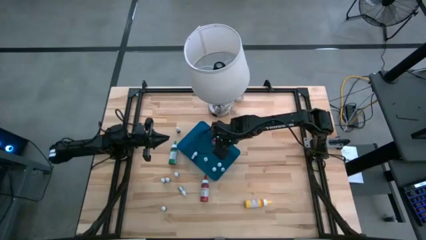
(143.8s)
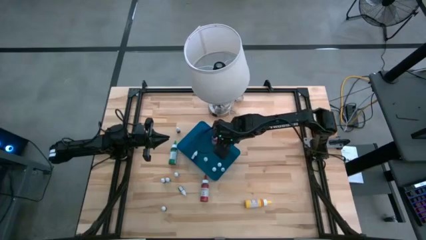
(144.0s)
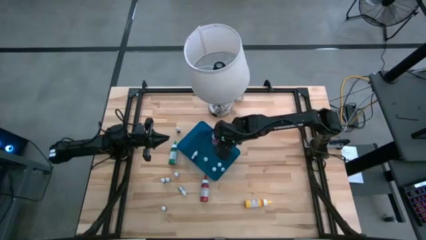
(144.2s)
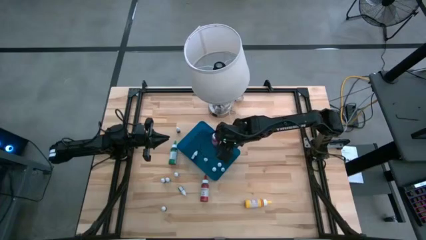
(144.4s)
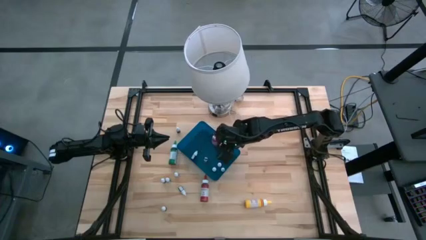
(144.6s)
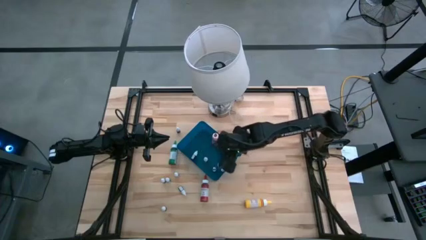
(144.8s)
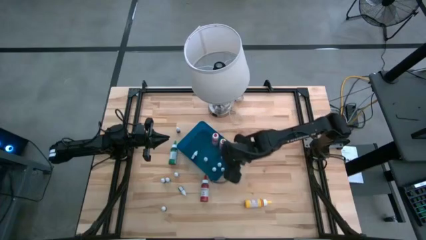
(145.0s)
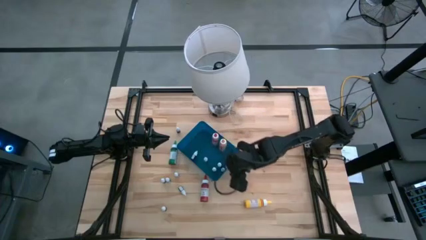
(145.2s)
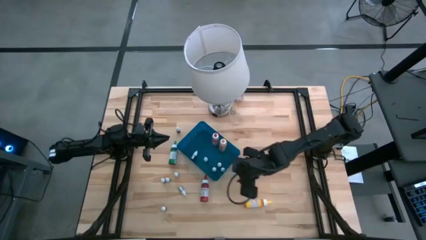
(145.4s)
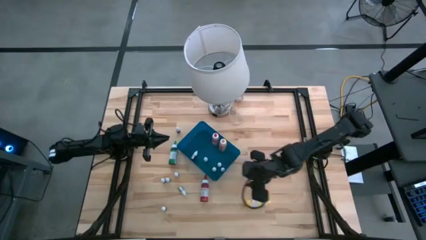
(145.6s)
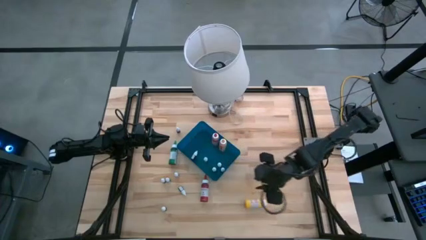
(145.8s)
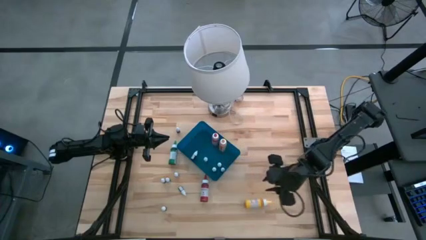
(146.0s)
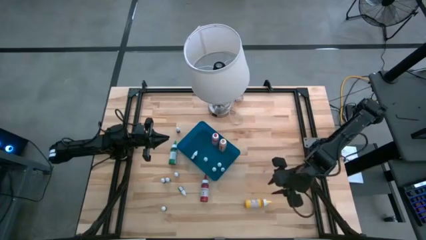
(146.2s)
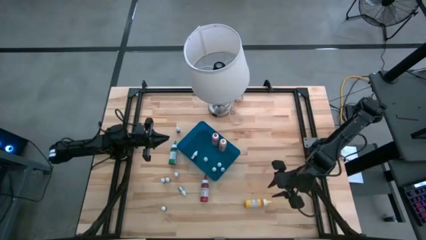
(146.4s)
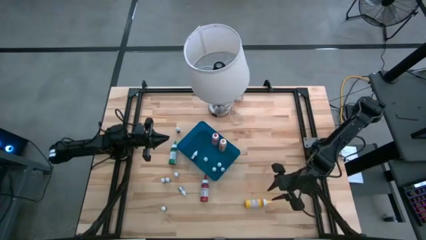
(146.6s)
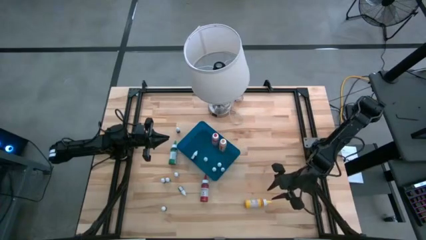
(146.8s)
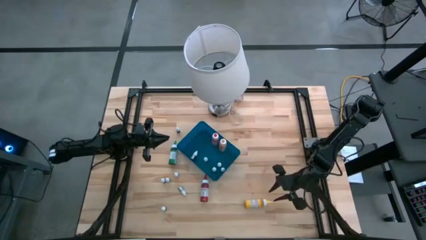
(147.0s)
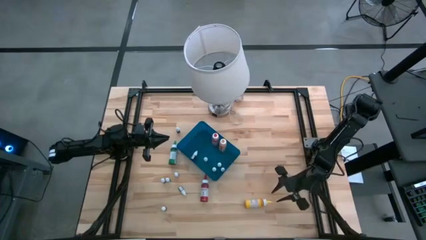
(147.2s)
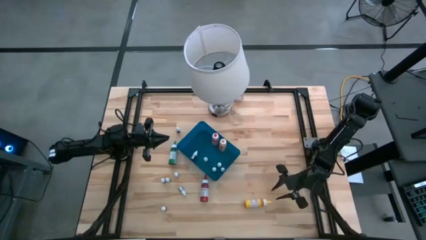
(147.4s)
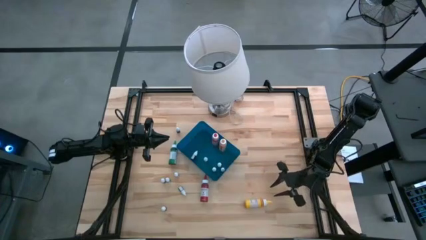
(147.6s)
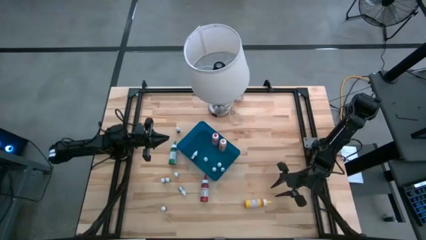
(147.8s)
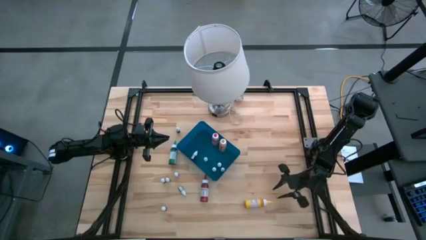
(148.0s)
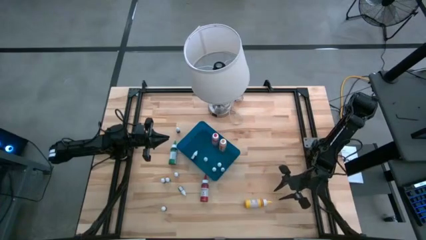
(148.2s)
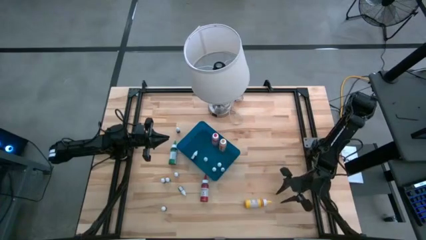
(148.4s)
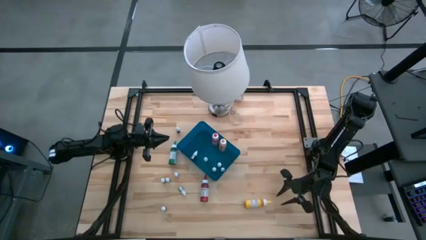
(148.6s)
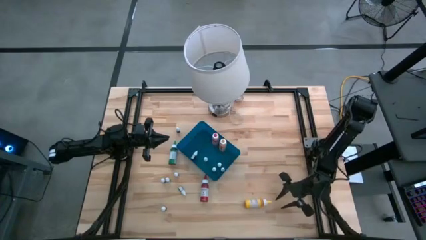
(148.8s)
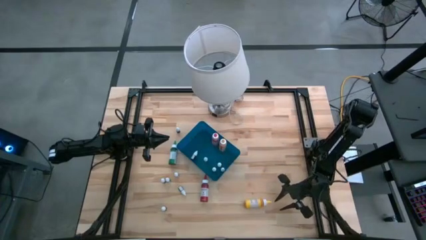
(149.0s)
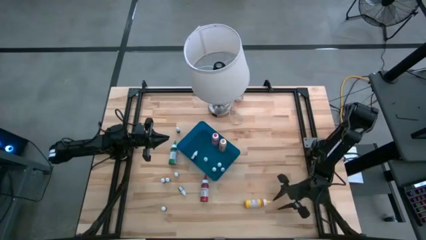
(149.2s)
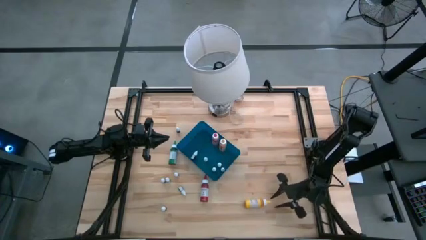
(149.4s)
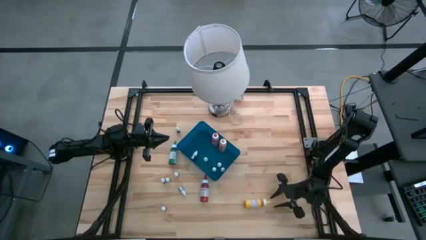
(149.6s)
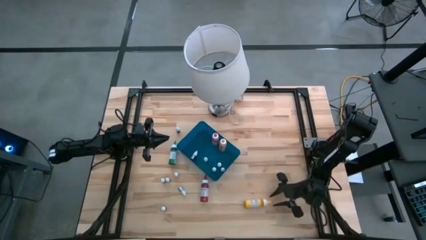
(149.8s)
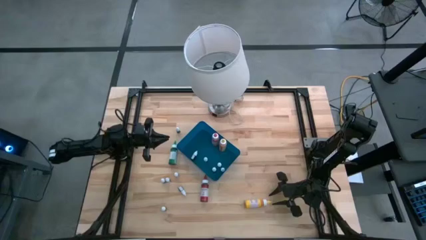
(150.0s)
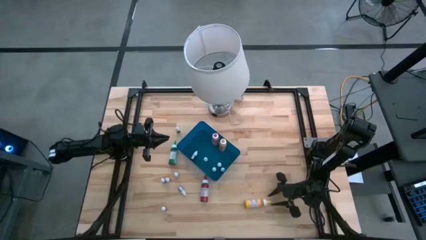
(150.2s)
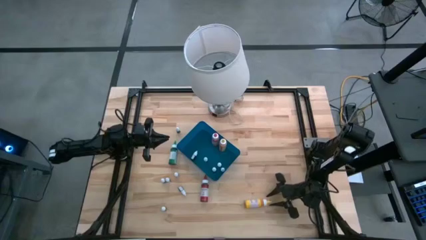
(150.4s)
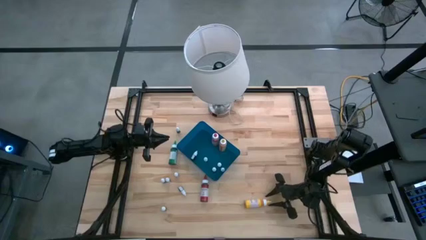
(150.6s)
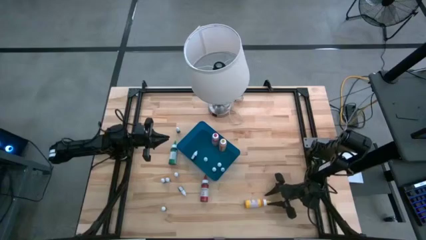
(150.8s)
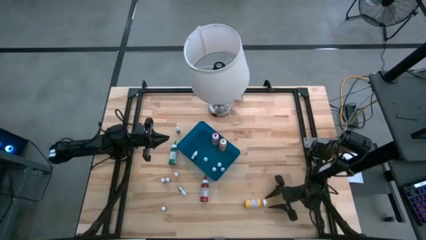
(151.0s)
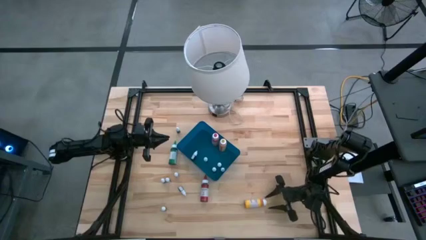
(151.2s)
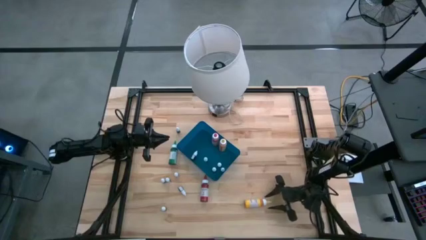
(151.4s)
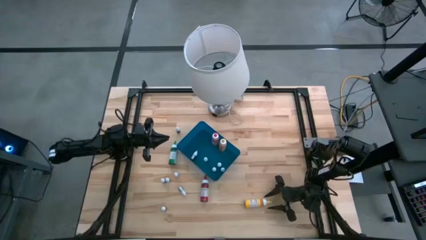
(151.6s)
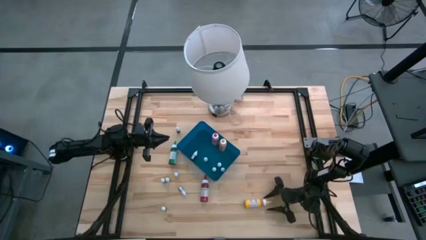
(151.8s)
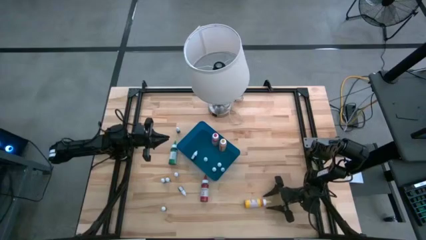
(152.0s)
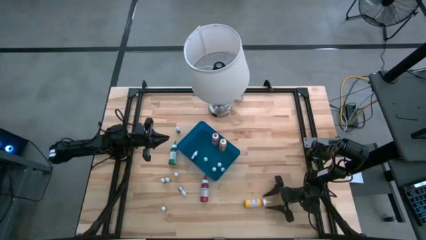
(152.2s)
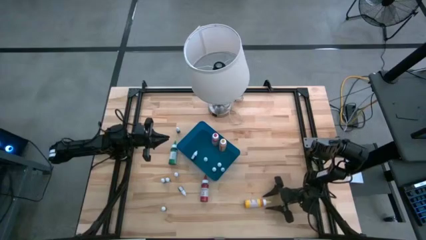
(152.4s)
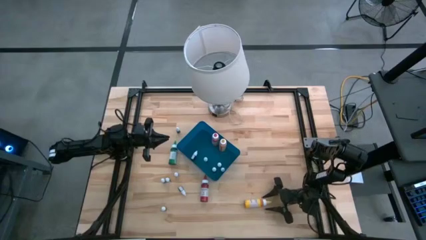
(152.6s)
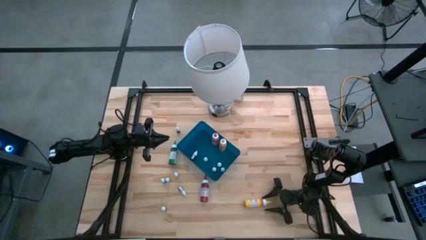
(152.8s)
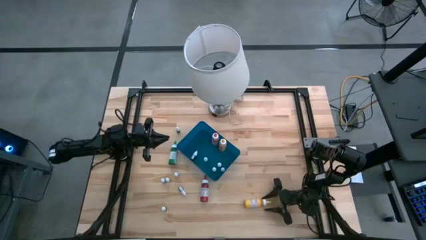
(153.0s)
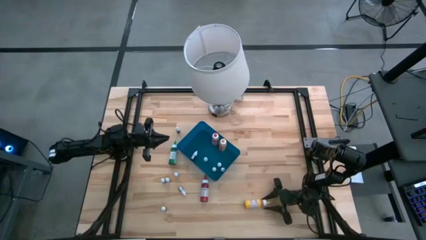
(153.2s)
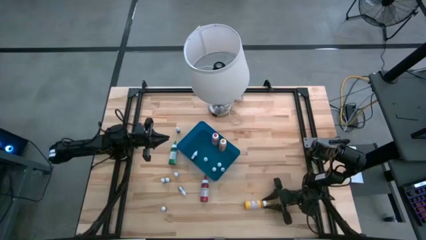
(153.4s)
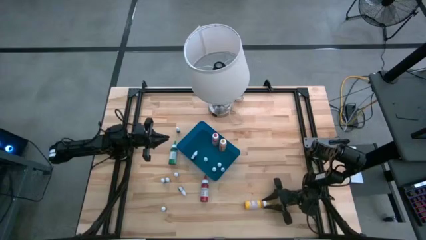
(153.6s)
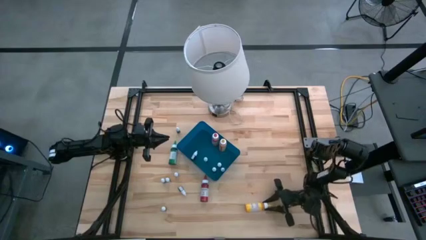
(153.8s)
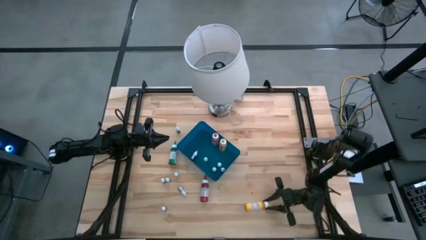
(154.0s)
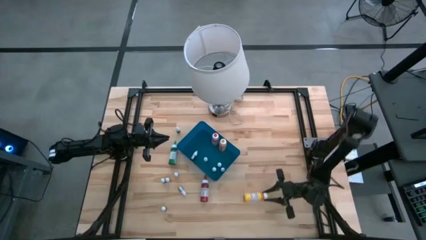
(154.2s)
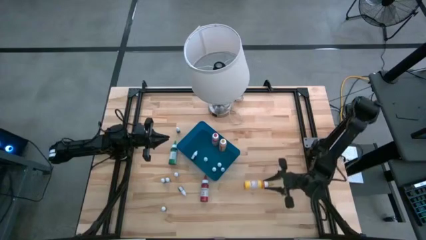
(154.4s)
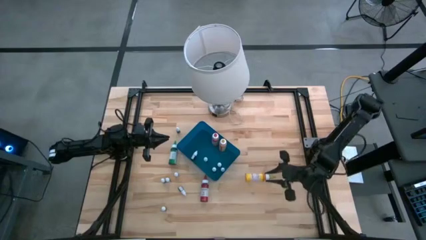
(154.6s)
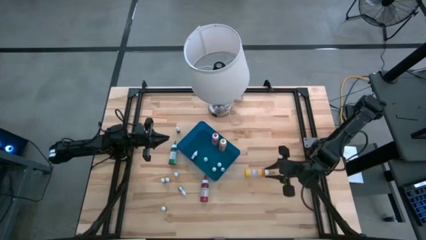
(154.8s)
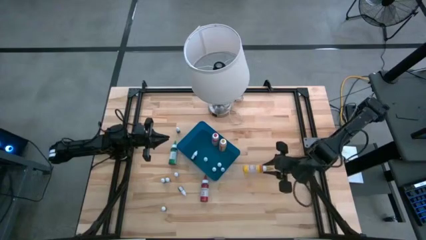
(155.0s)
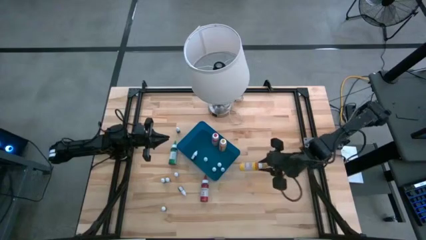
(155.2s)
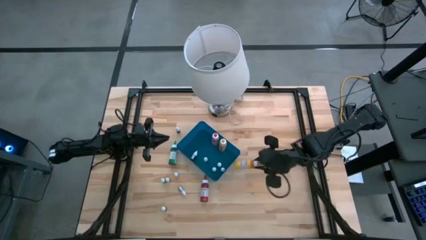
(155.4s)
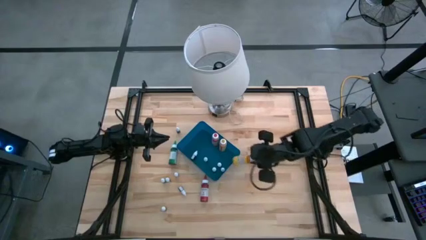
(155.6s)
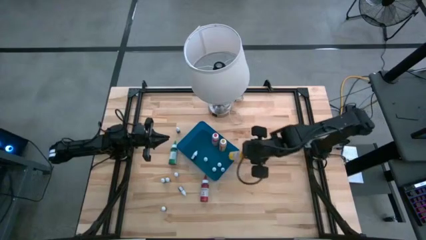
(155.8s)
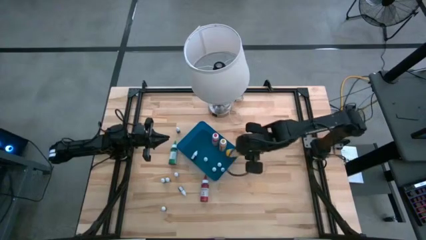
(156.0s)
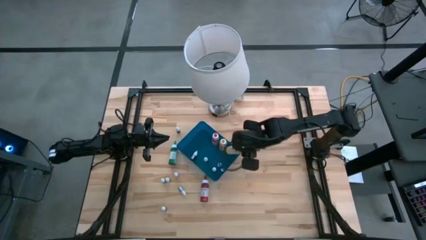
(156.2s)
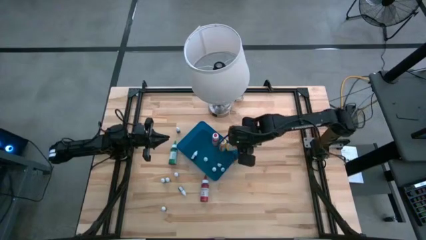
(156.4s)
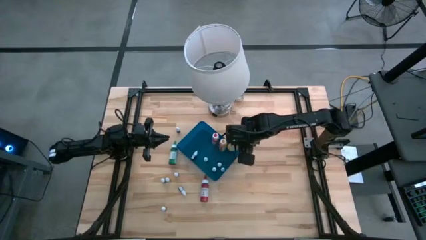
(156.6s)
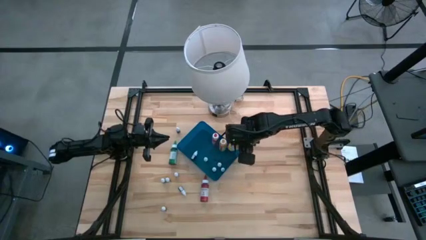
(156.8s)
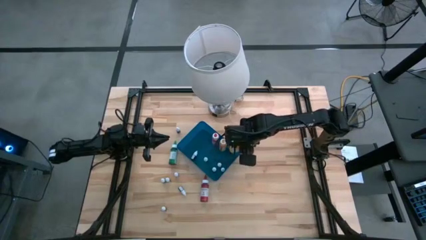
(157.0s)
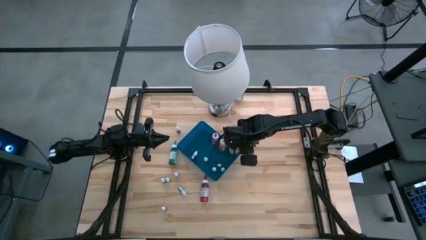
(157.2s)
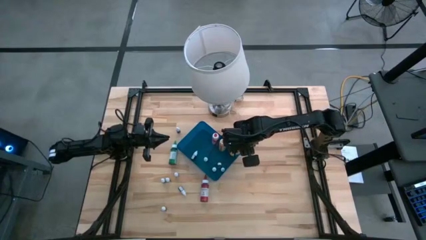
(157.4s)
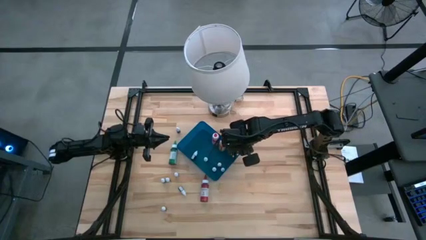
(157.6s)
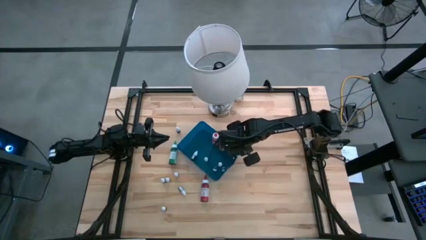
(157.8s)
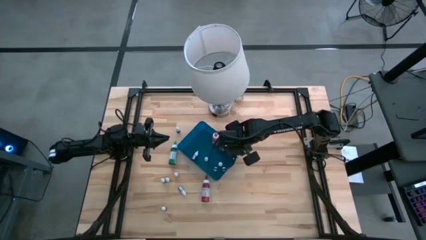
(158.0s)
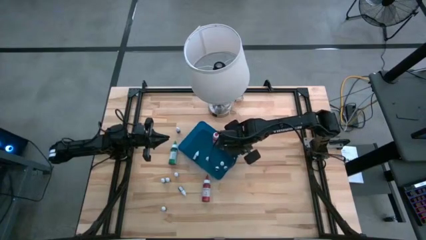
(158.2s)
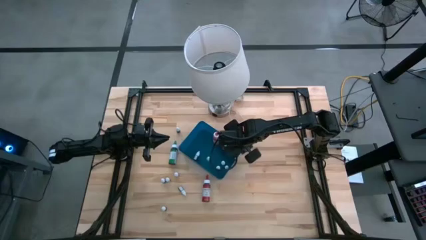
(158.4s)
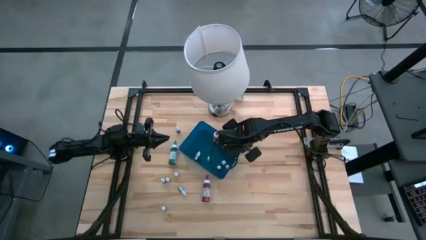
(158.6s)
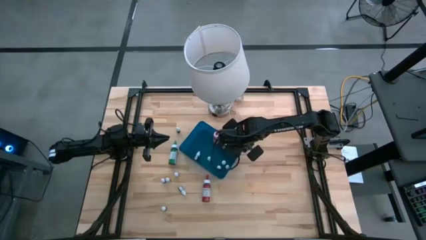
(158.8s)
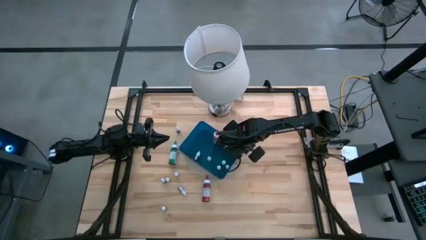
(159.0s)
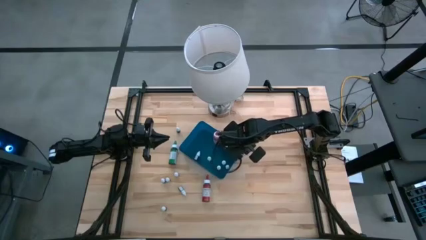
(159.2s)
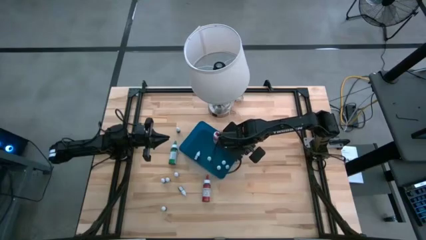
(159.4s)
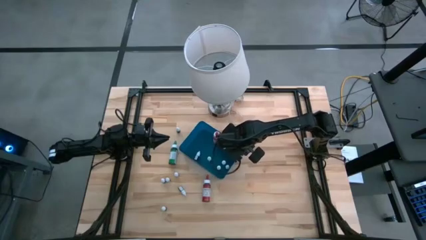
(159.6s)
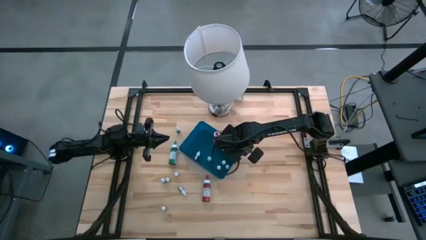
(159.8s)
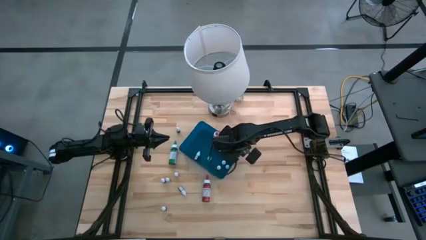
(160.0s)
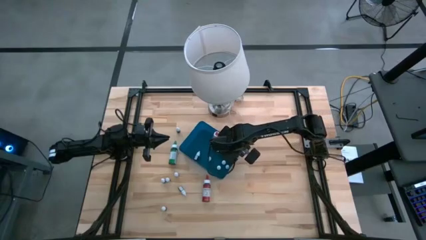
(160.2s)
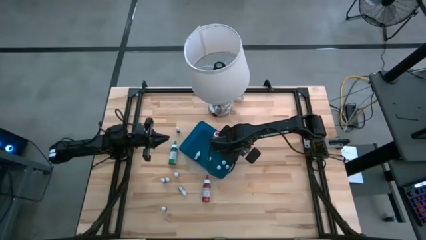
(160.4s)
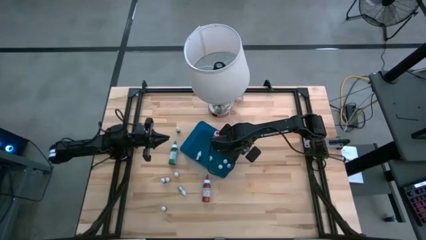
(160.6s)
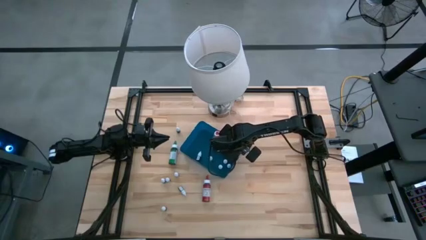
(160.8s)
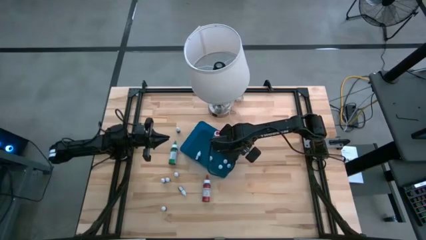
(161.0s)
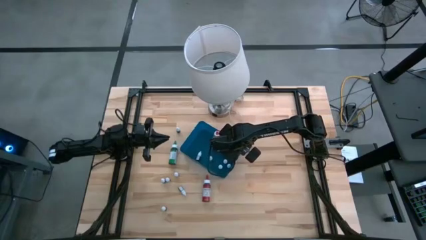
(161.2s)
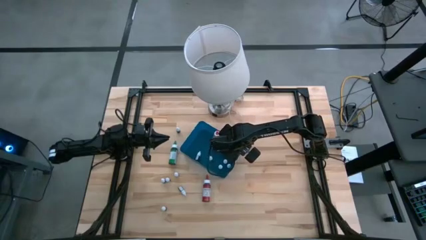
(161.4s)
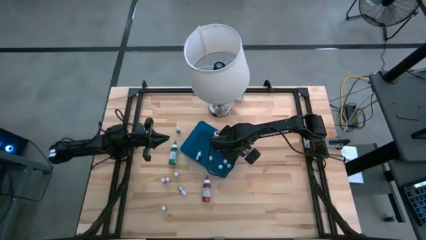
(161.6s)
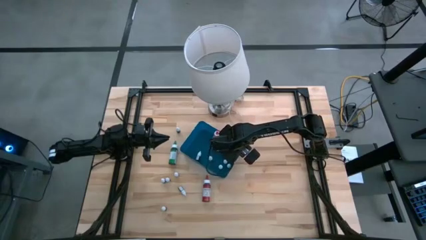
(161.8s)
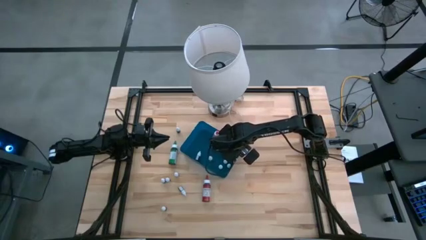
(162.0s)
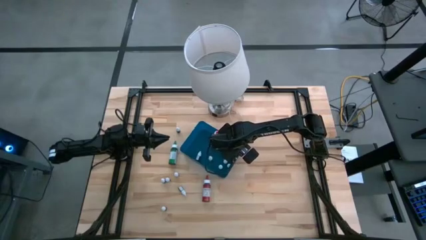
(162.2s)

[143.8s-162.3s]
Task: Pick & Place food coloring
Put the large yellow food coloring bottle into the blue container
